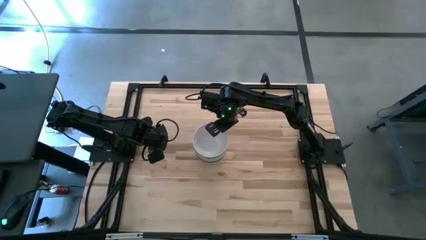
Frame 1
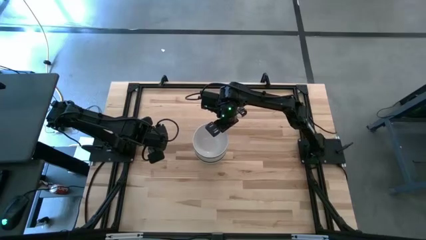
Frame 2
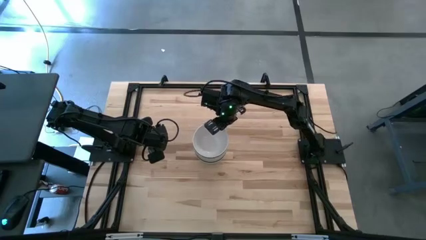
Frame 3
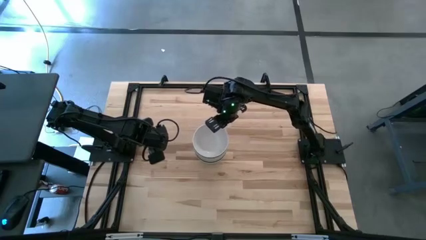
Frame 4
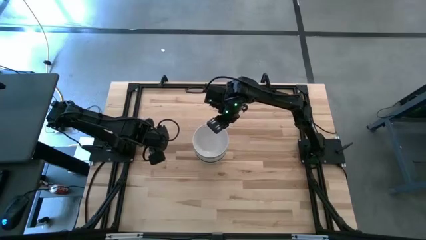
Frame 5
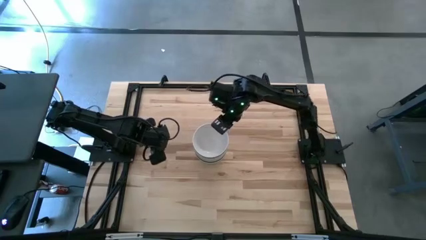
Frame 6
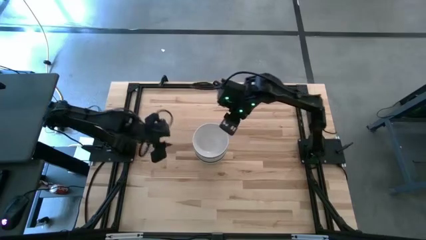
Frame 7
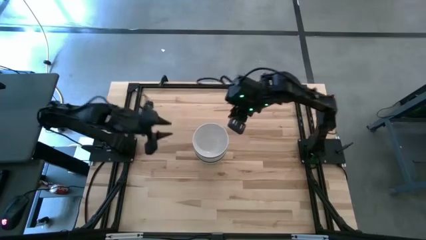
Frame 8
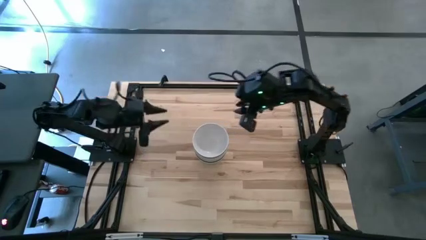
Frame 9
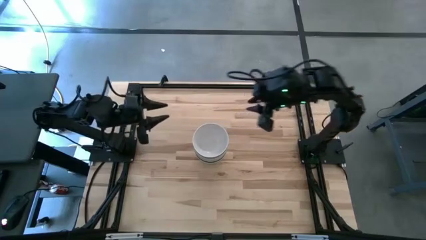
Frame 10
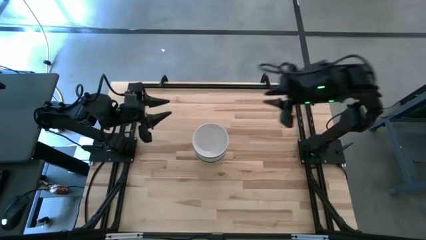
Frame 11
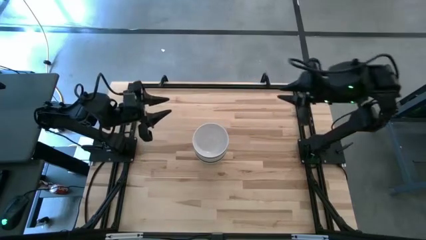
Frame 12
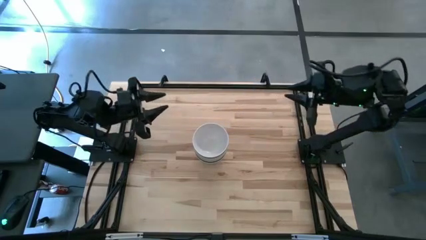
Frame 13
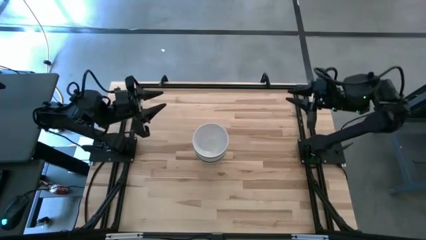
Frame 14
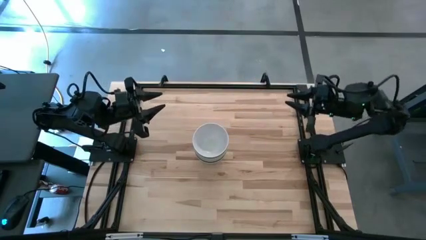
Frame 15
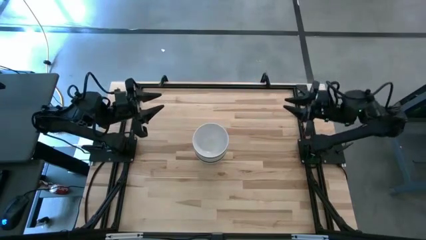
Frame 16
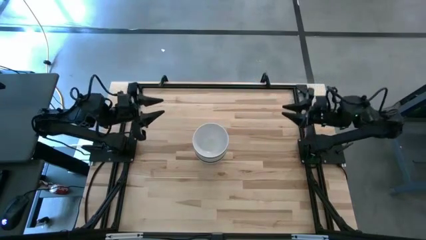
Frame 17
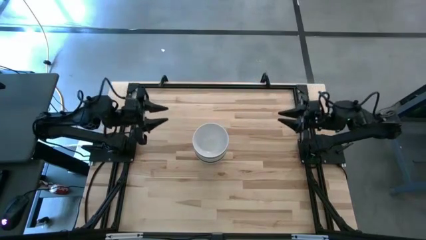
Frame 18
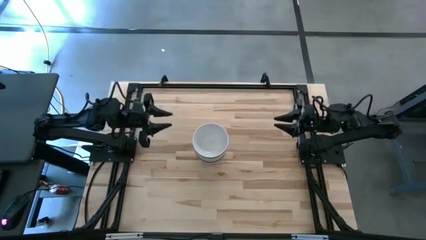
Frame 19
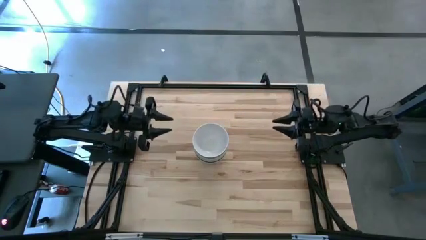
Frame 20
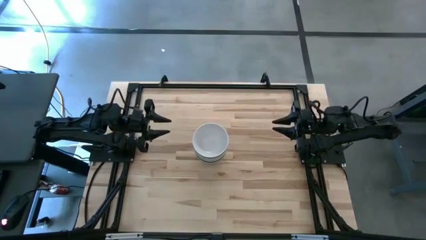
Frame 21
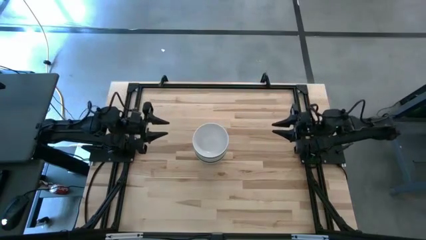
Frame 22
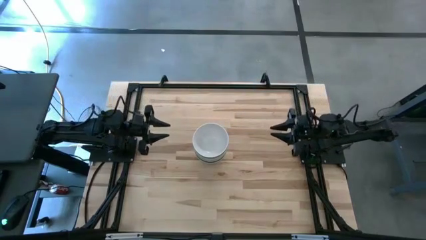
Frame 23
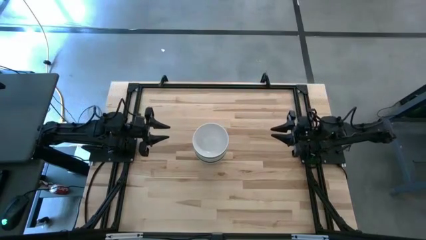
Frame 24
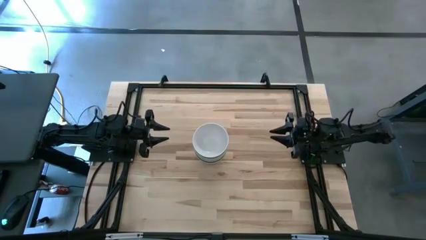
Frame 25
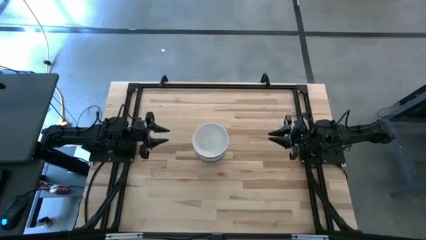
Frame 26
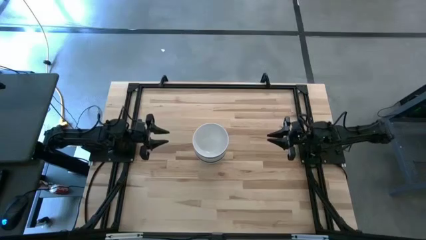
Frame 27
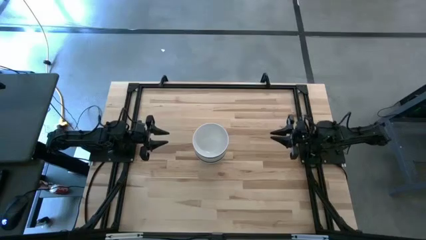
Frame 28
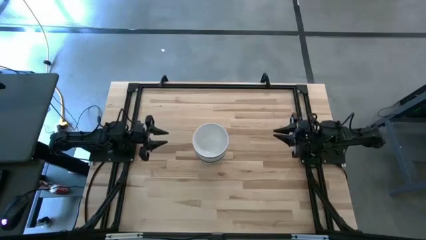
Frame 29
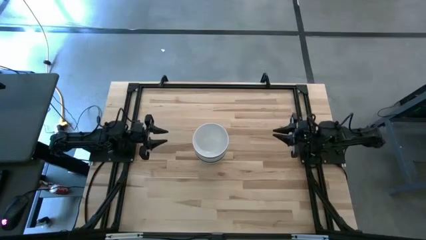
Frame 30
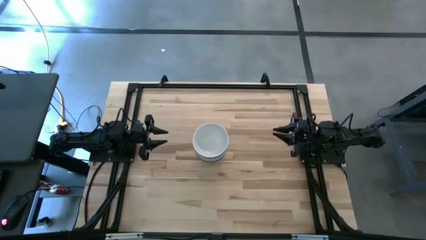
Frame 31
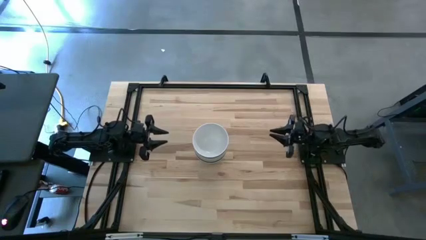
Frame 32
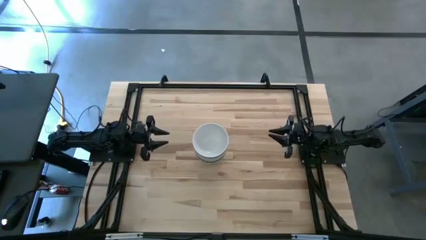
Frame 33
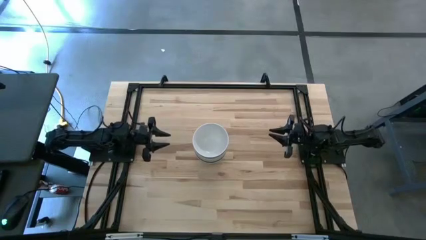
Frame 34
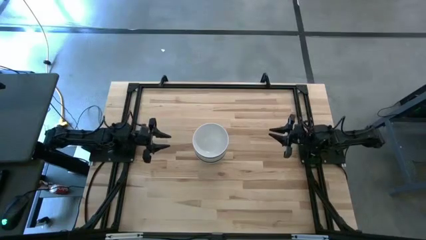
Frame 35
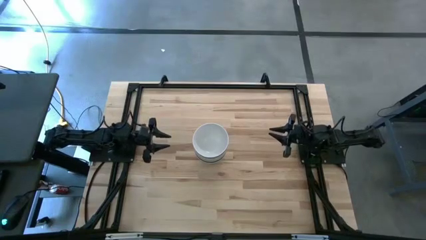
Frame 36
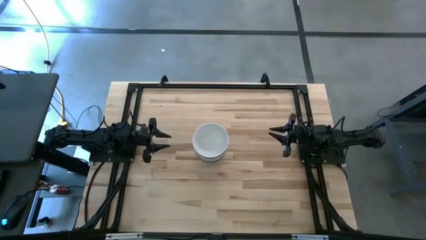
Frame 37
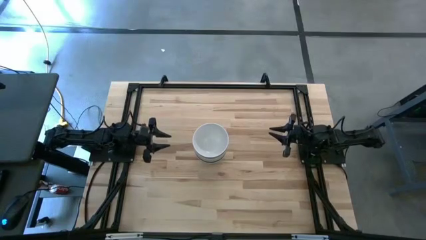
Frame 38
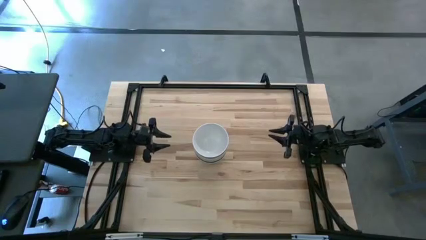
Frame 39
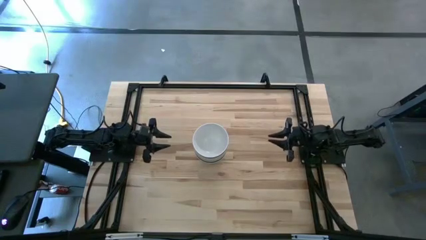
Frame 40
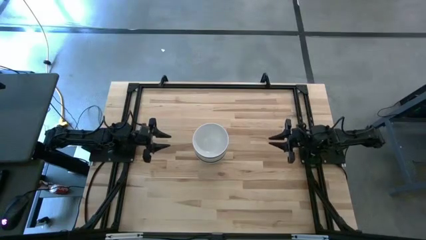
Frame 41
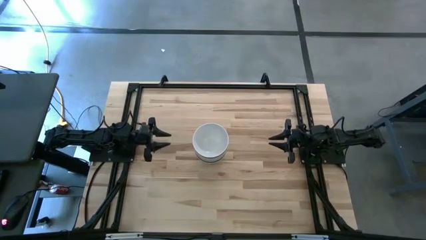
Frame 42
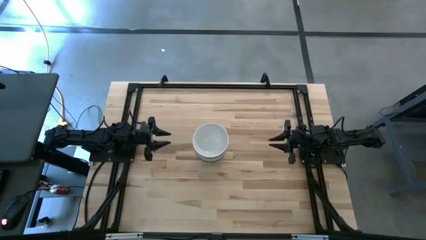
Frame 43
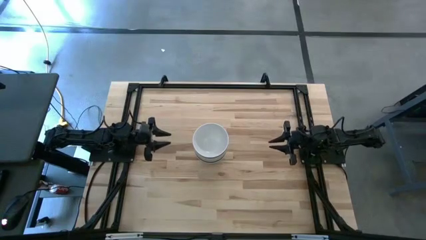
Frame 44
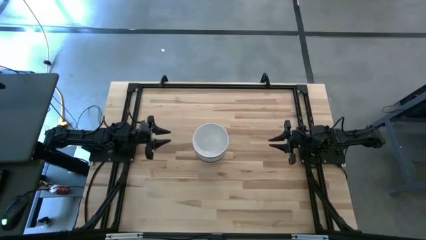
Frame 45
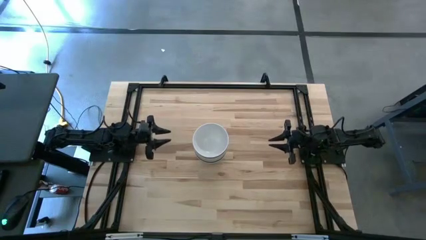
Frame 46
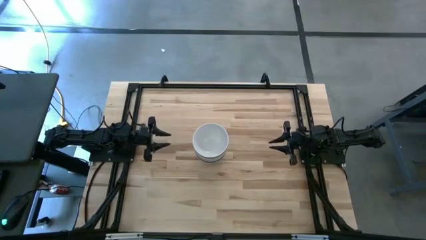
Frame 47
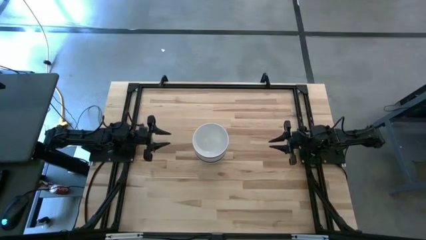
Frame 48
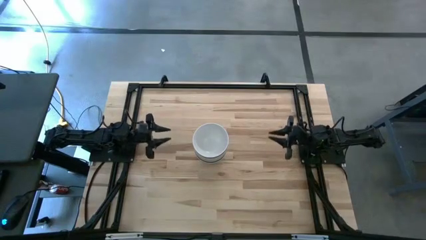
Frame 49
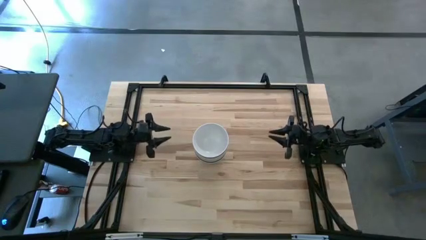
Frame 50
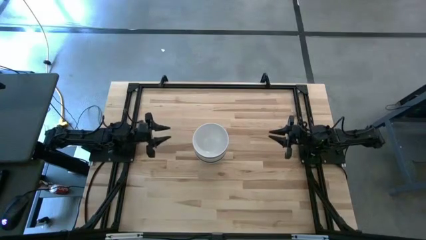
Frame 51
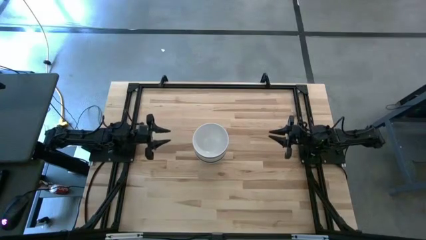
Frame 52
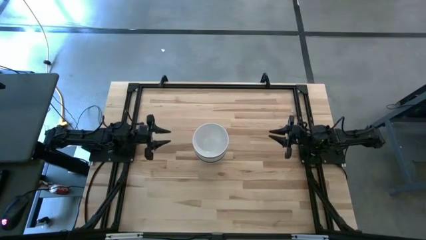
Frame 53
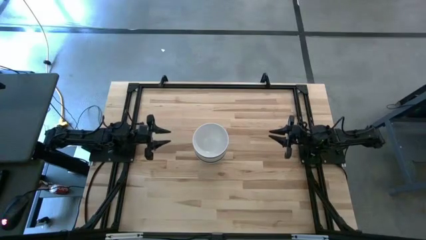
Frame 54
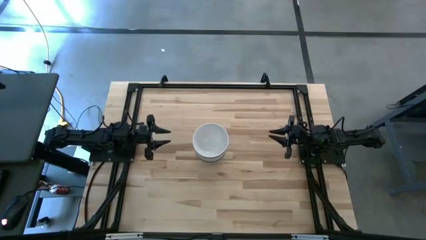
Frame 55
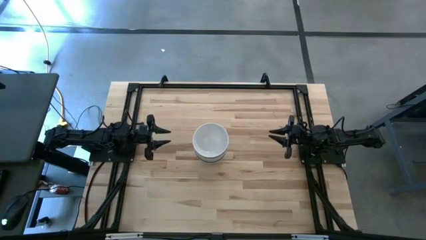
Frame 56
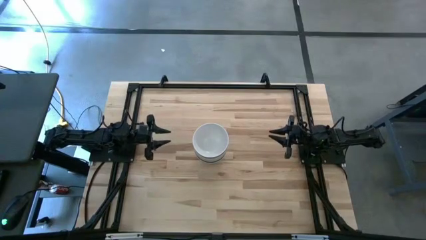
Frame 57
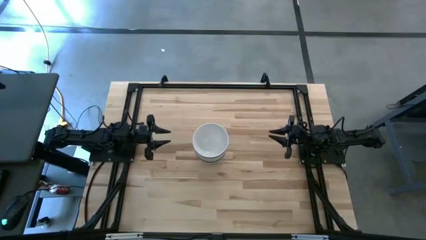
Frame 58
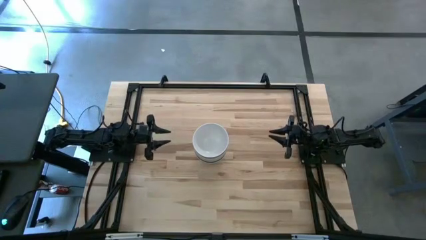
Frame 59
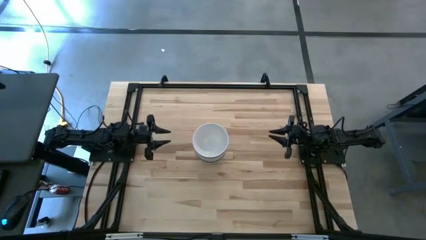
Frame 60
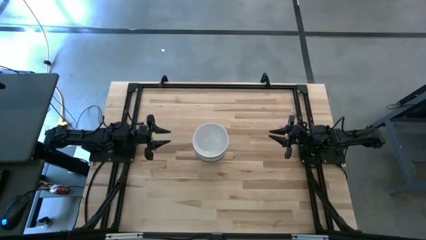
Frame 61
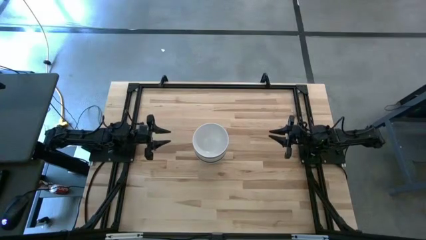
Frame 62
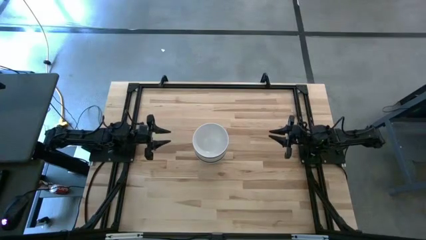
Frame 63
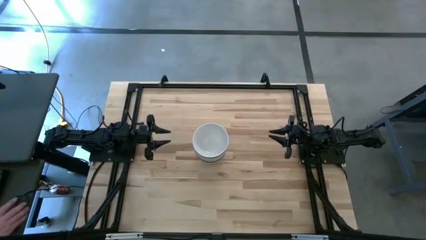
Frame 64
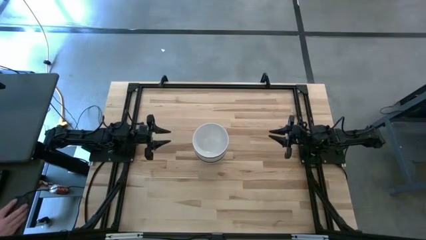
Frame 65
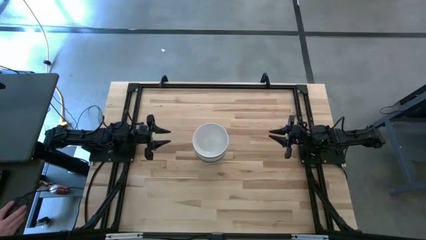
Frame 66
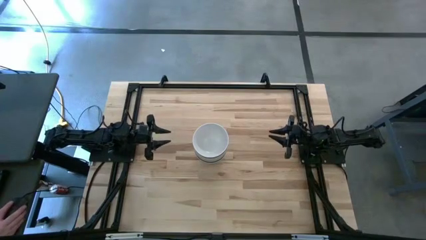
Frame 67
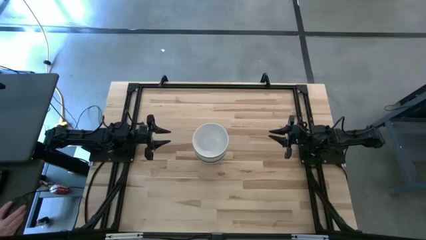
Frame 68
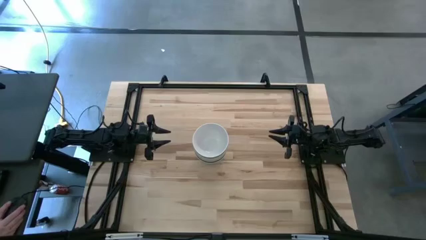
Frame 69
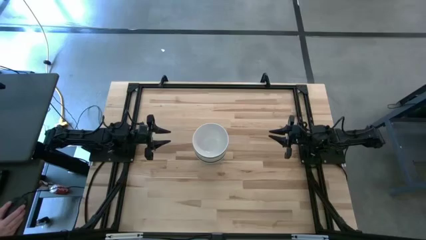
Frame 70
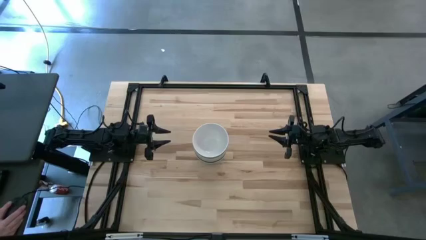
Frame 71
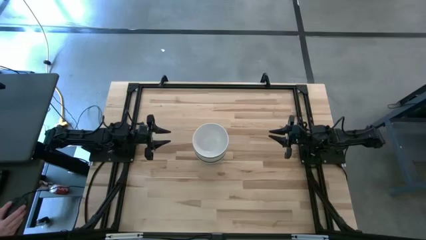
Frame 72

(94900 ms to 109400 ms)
Task: Nest bowls inside each other
Return to Home Position

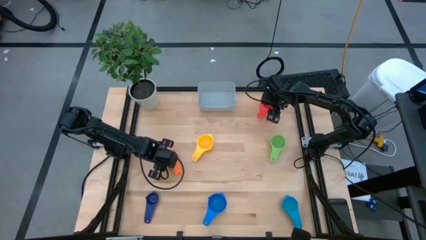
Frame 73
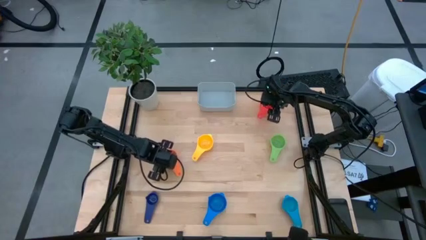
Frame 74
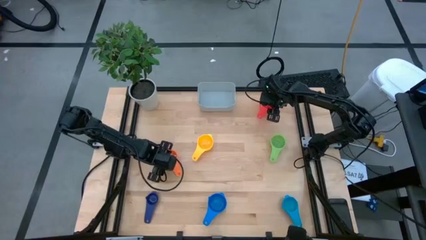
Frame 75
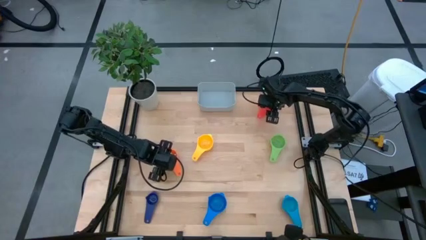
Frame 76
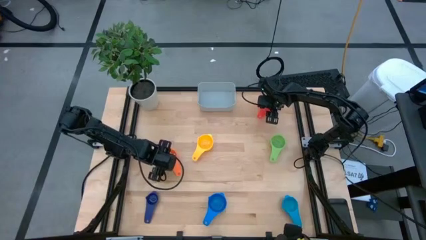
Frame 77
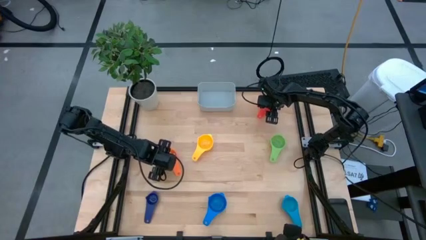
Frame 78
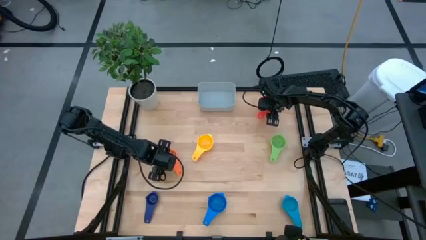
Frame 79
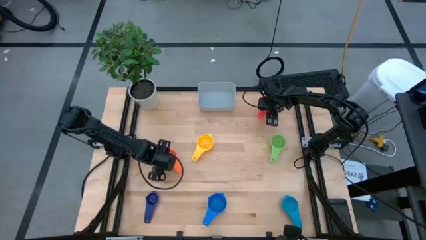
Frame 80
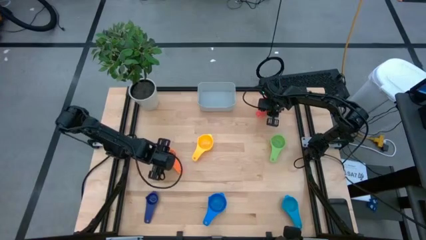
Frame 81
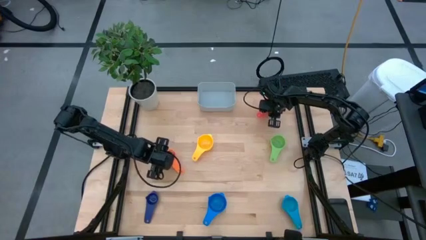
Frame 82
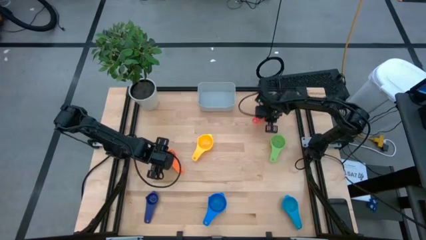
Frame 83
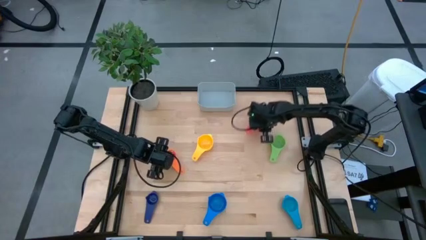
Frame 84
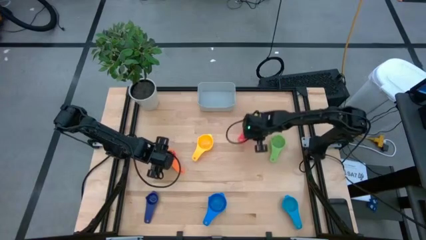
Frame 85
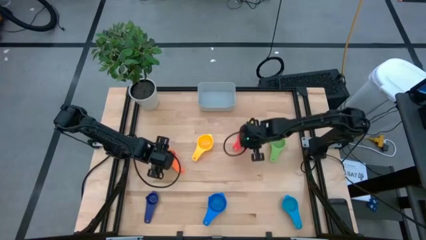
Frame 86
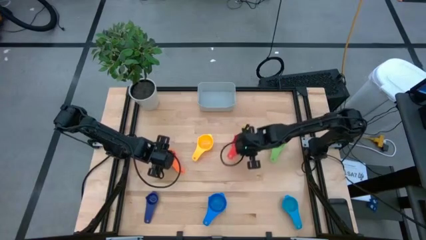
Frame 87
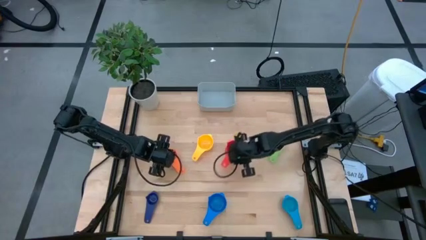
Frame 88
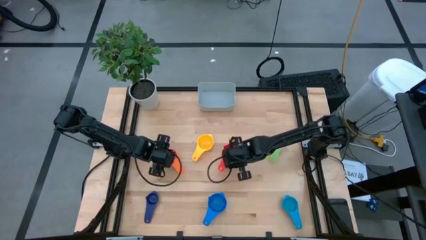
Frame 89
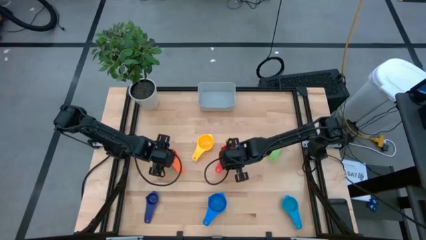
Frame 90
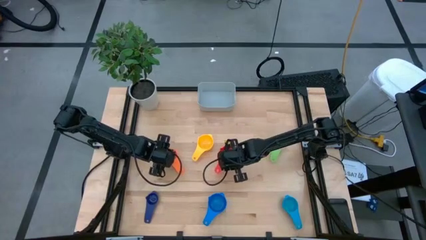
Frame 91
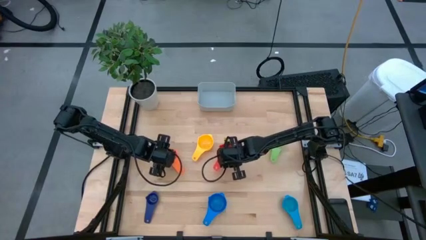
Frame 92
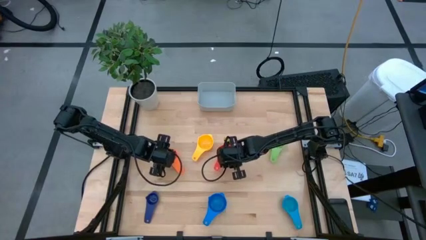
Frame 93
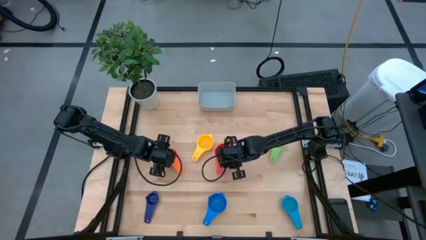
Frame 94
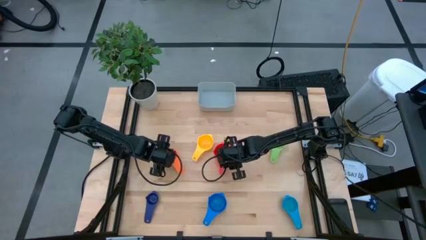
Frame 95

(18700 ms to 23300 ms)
Task: Nest measuring cups in basket
Move the red measuring cup to the center of the table
